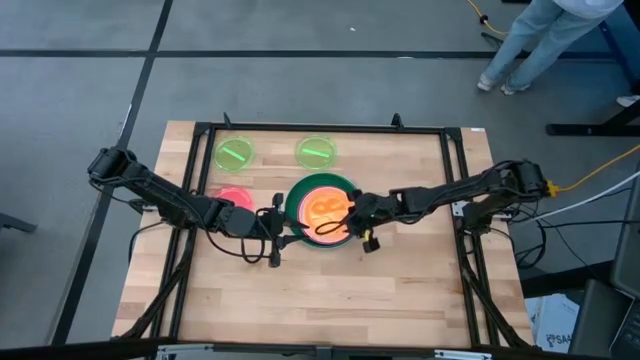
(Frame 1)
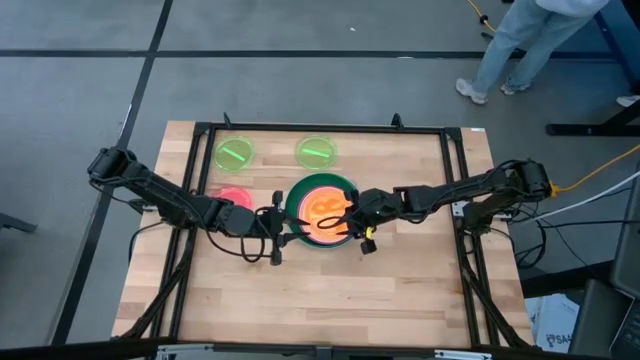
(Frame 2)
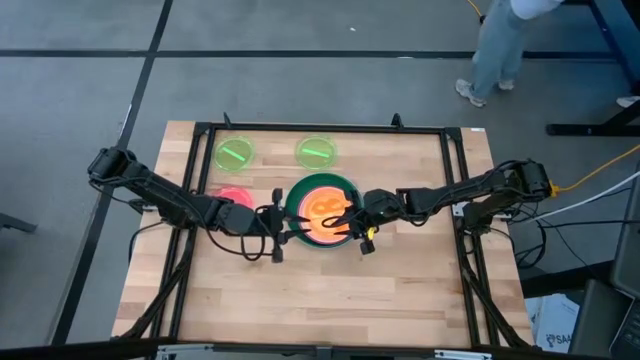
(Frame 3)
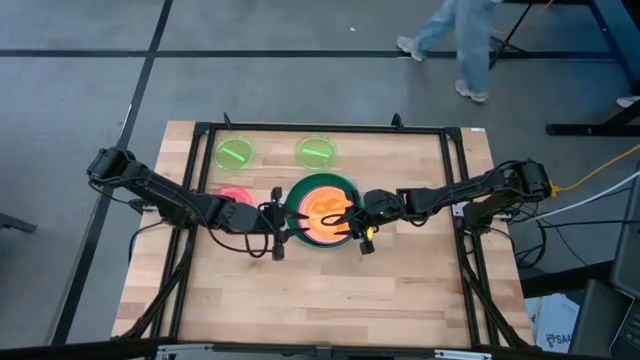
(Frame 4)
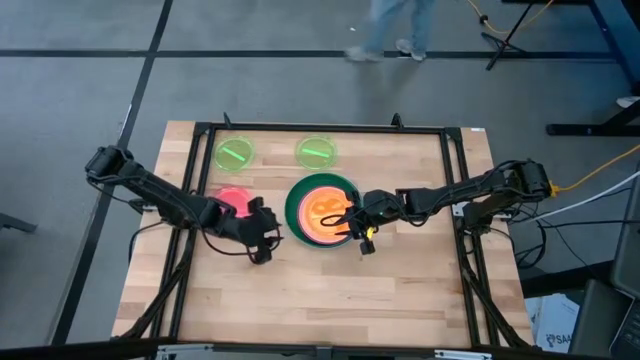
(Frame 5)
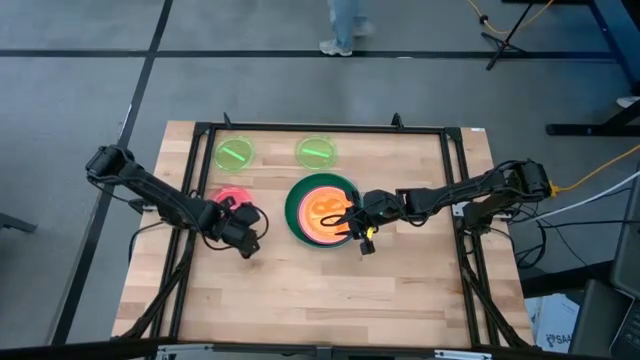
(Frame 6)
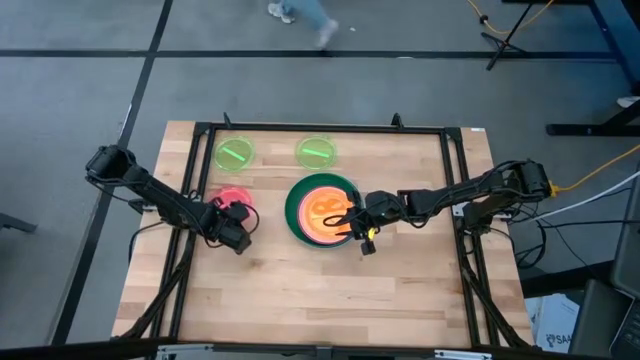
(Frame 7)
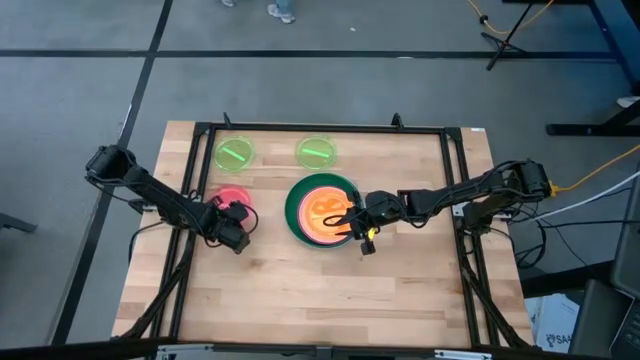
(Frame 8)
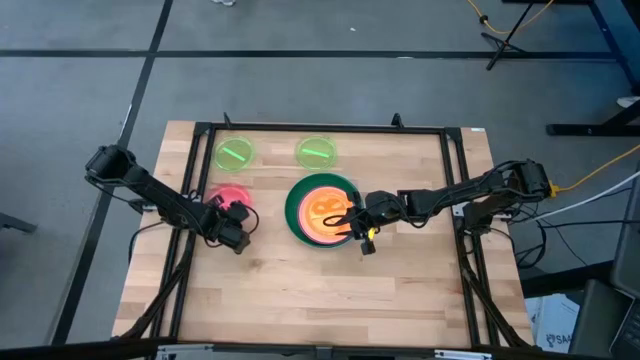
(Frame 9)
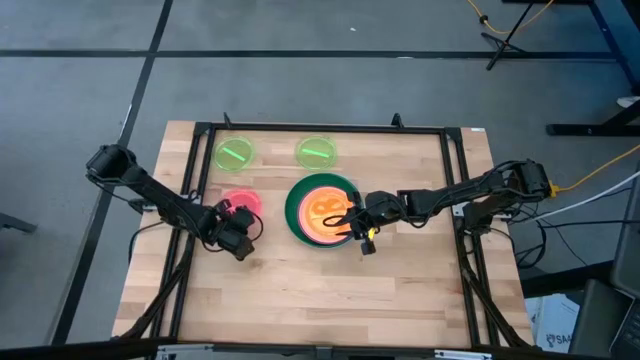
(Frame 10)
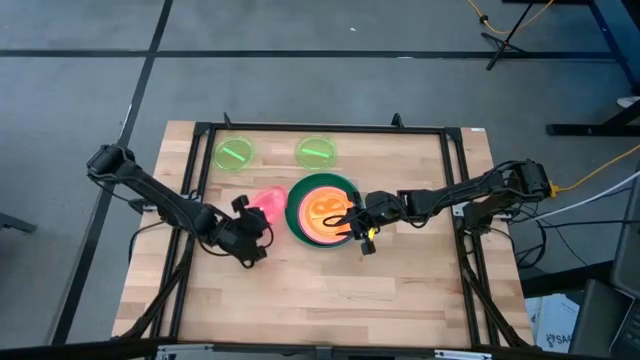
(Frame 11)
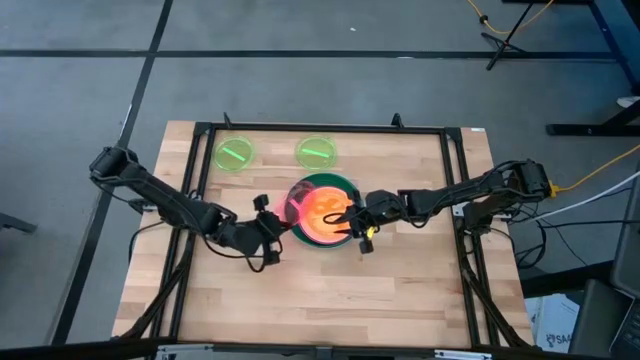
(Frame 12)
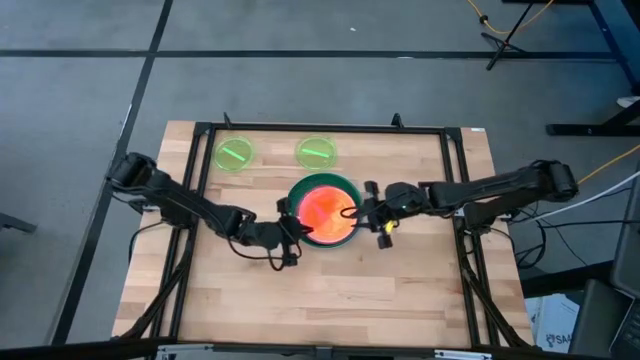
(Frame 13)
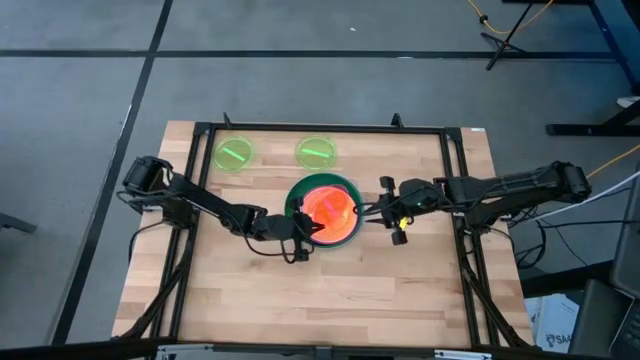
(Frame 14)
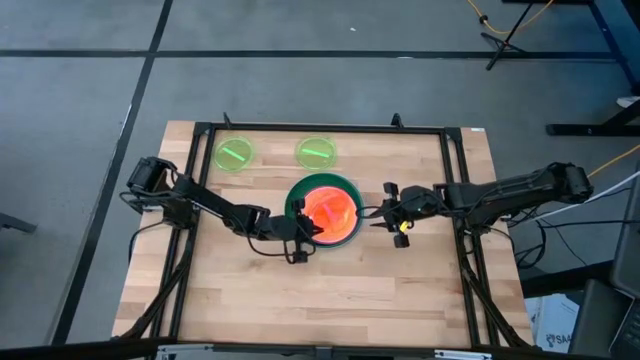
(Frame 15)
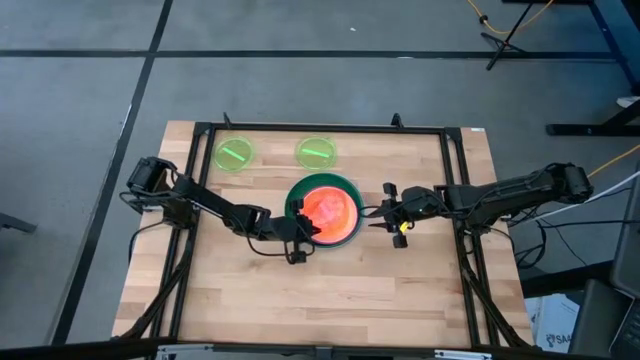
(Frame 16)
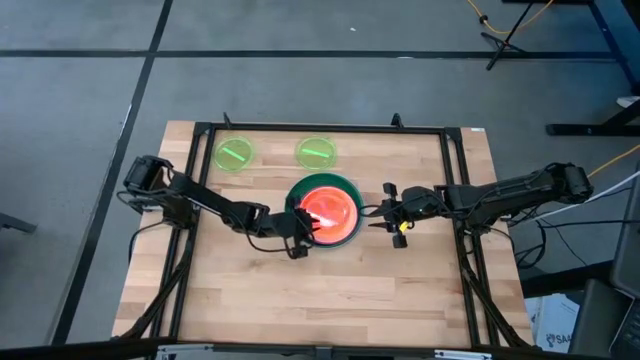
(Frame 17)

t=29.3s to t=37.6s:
Task: Stack plastic plates
Stack the light pink plate on top of the orange plate

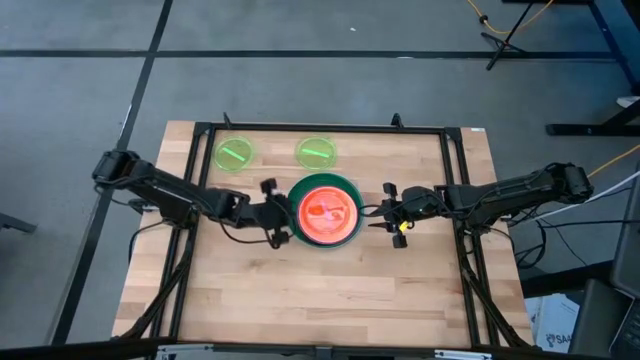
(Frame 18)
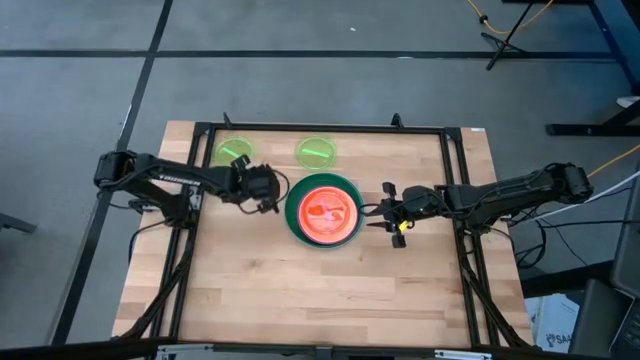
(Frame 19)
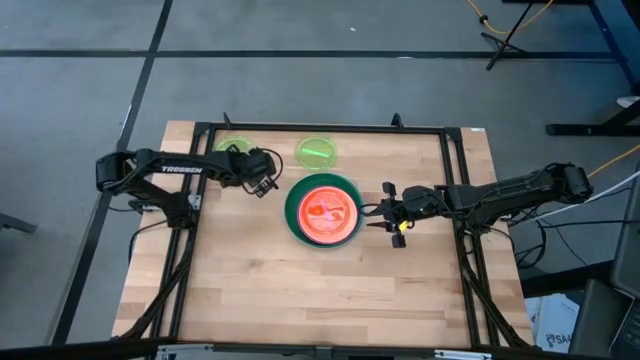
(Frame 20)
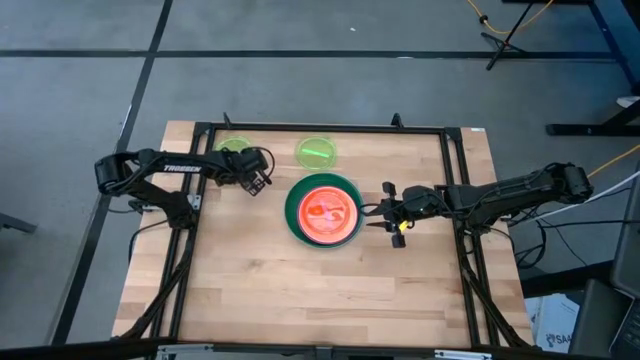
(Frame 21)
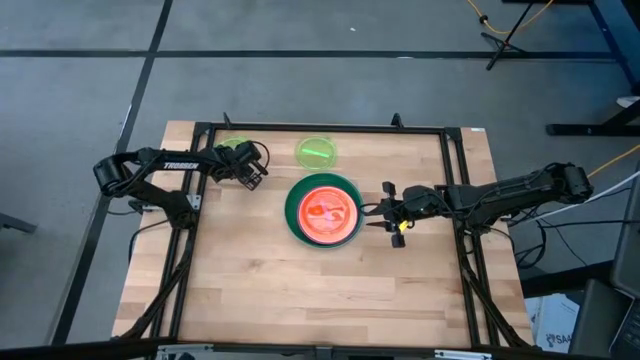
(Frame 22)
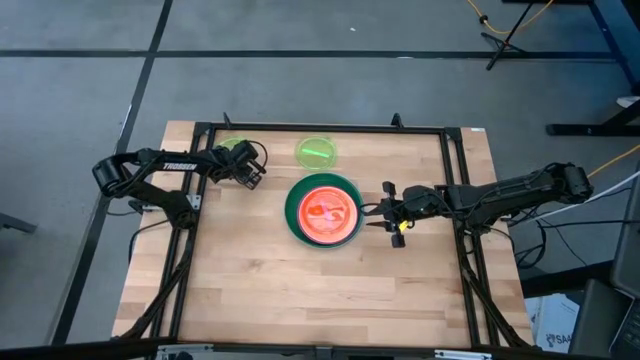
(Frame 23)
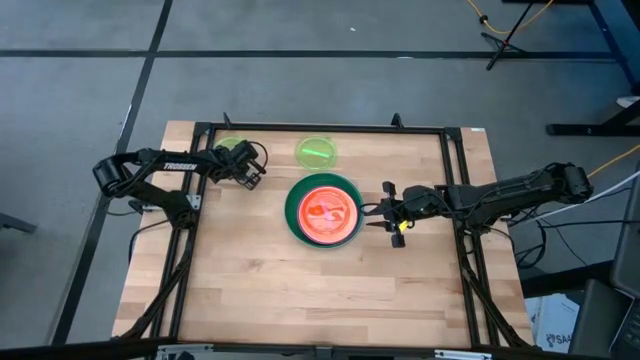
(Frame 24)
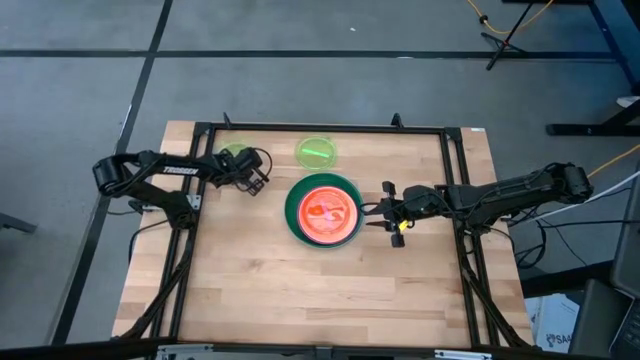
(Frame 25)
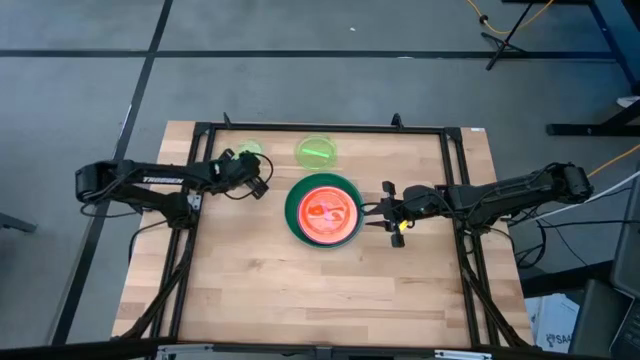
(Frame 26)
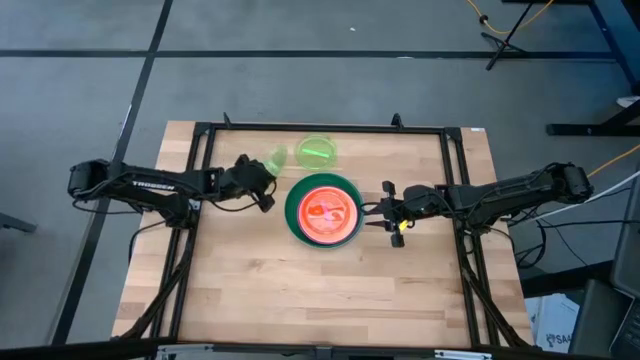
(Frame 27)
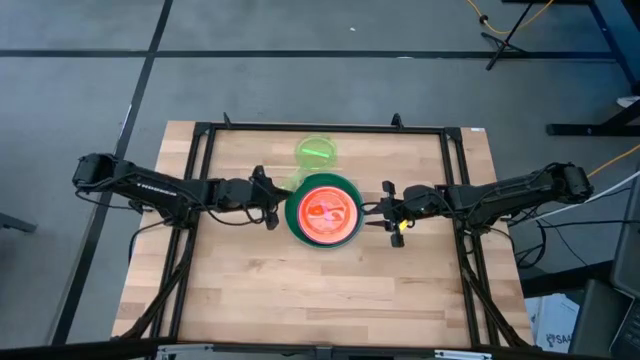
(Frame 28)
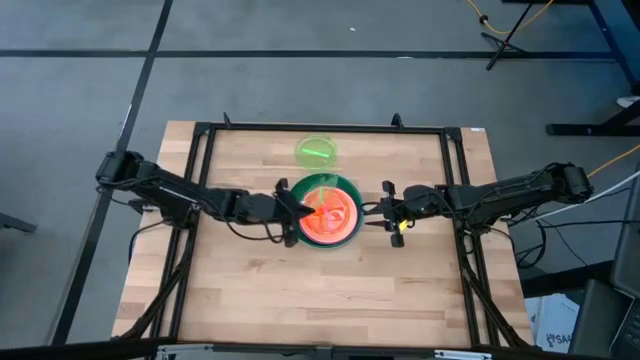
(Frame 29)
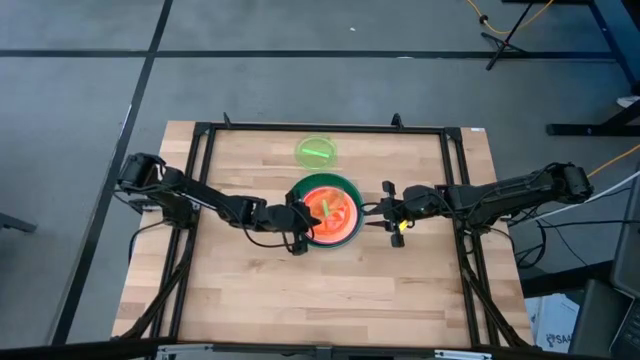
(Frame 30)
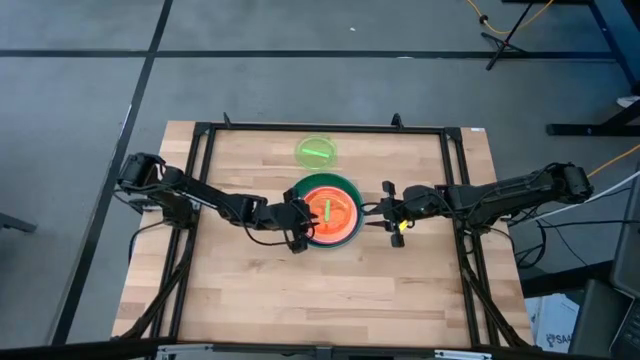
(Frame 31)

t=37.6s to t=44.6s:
Stack the left green plate on top of the light pink plate

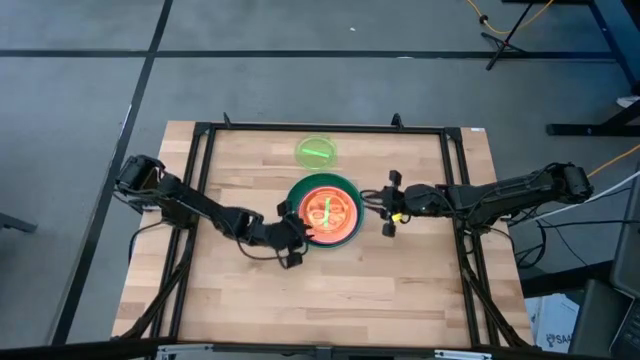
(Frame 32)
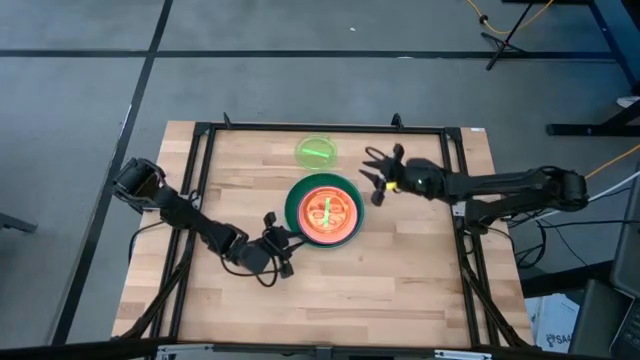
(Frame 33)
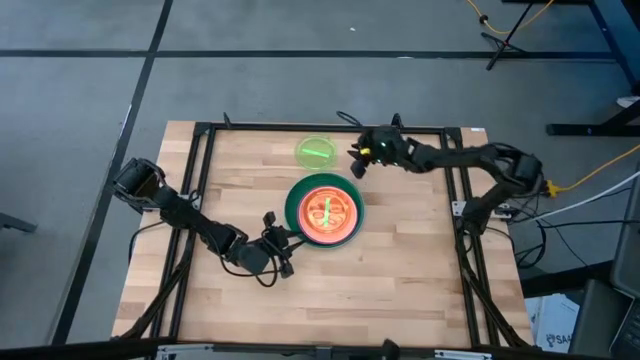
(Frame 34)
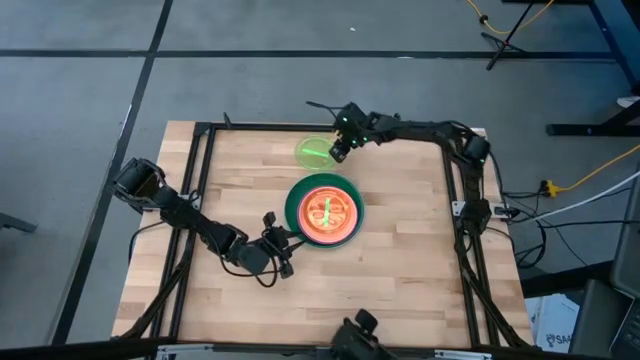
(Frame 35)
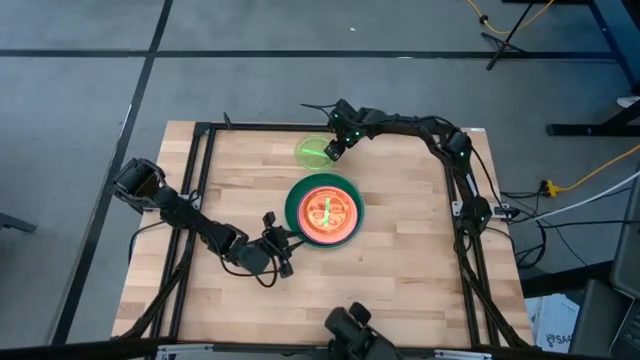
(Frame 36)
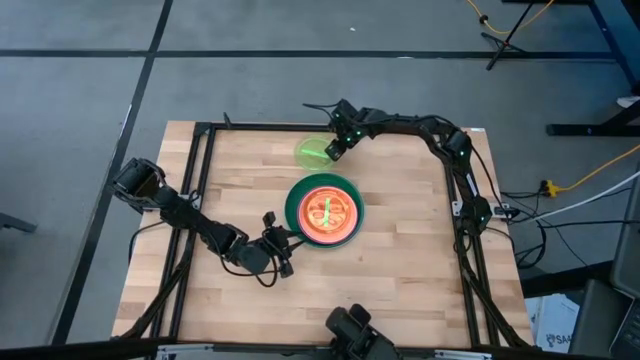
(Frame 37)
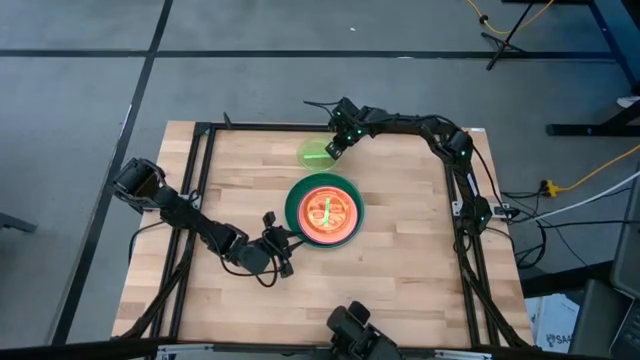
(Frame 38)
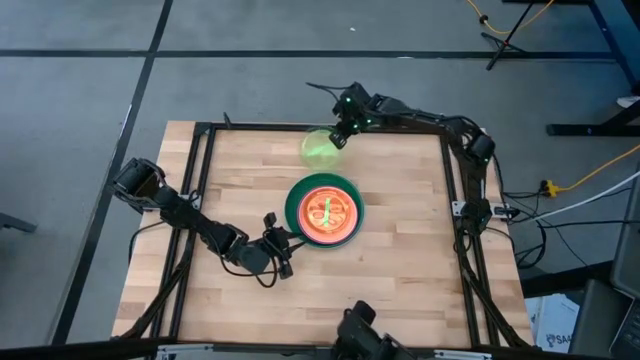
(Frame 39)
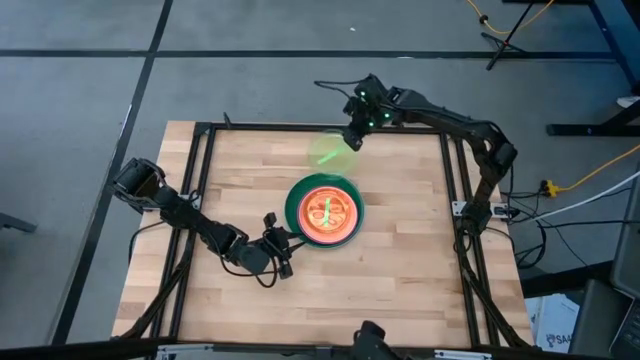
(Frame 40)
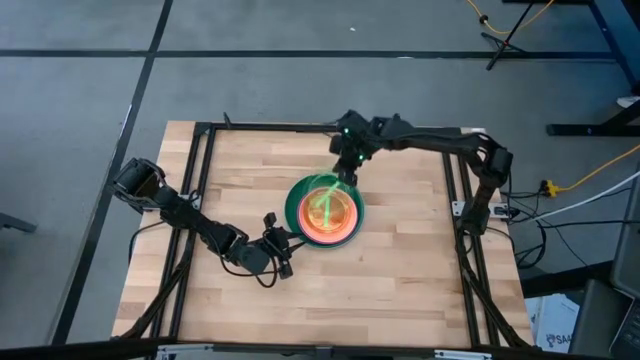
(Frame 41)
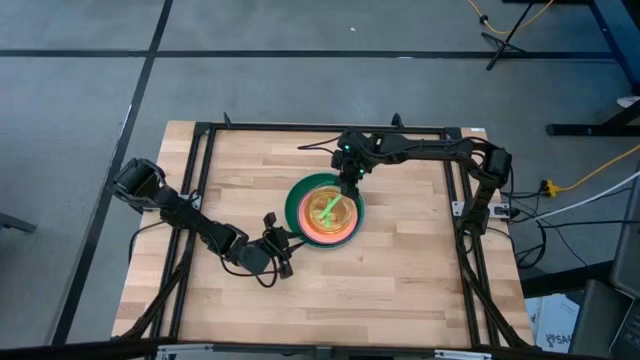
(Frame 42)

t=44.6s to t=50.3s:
Stack the green plate on top of the green plate
